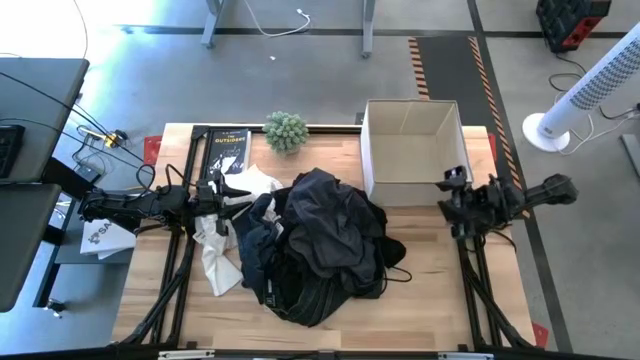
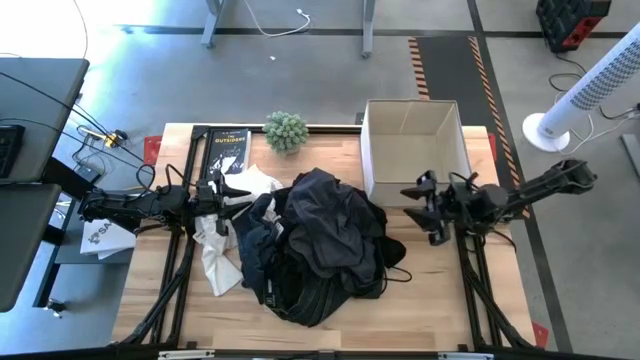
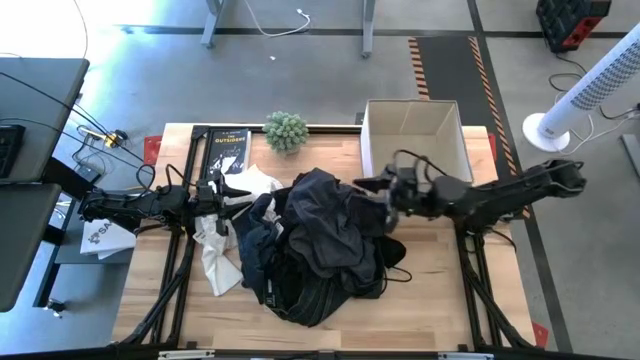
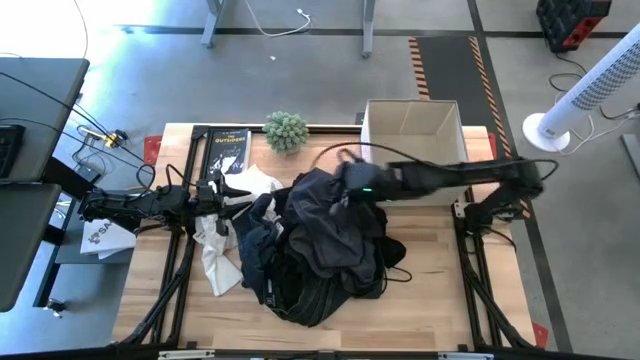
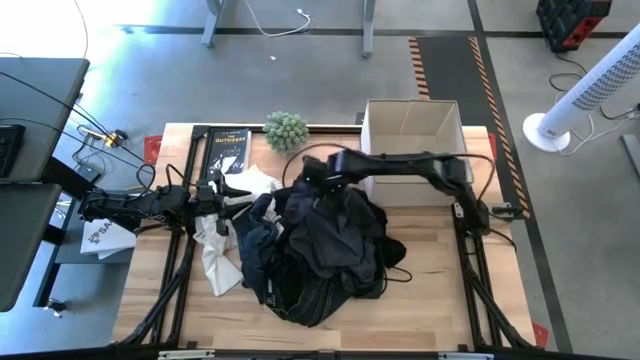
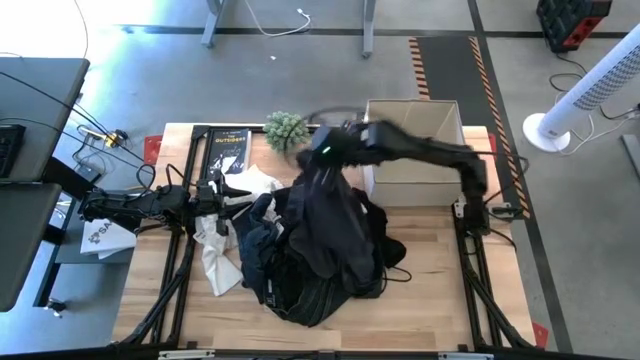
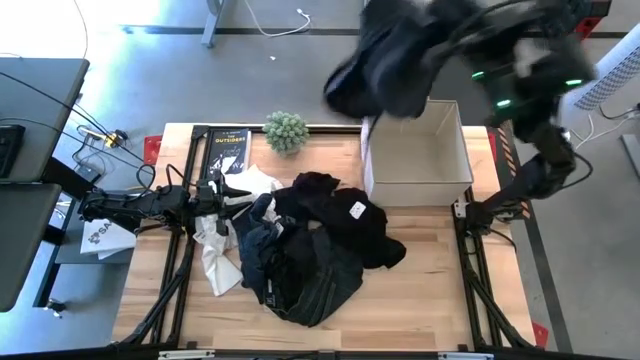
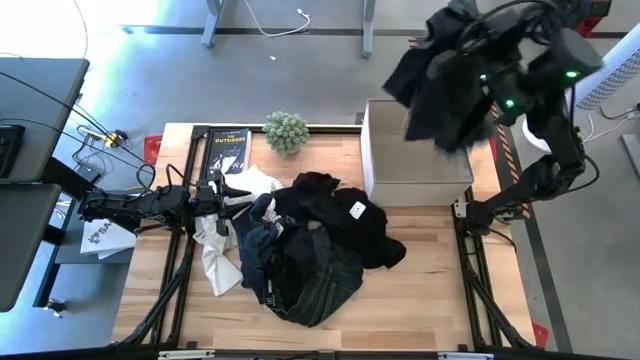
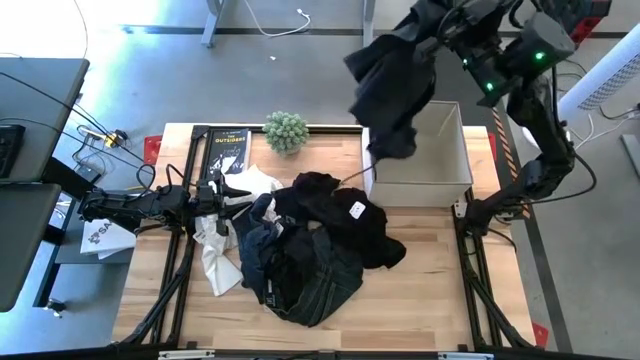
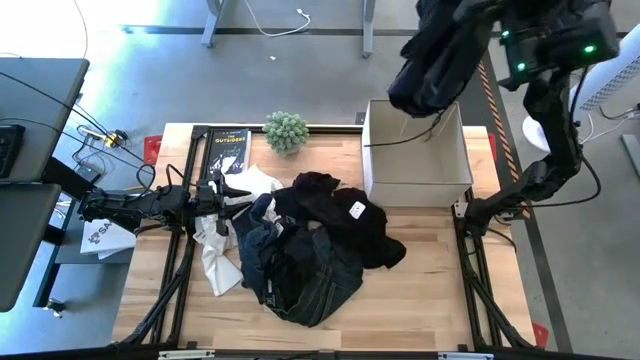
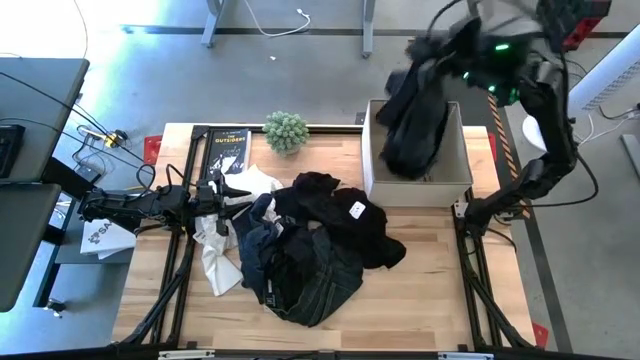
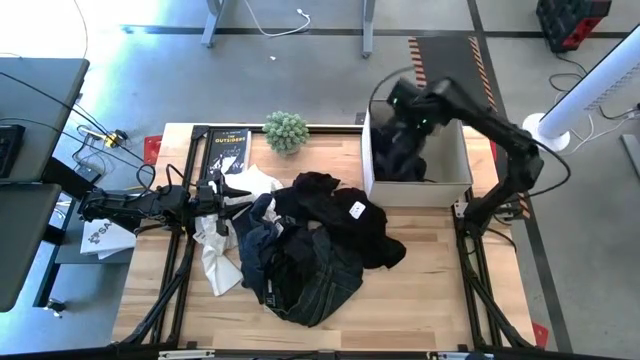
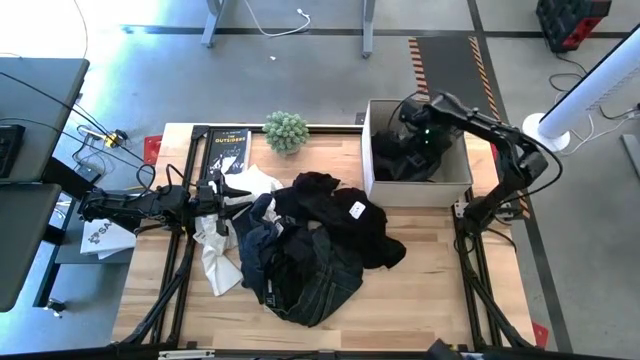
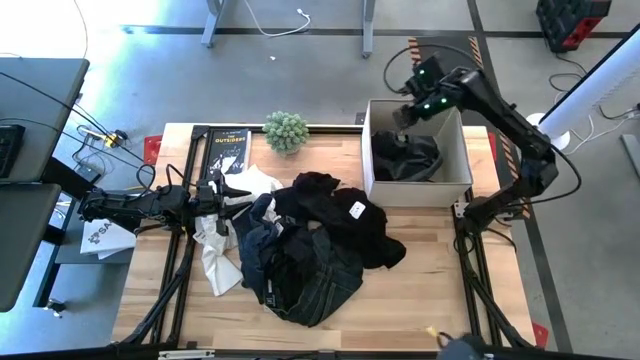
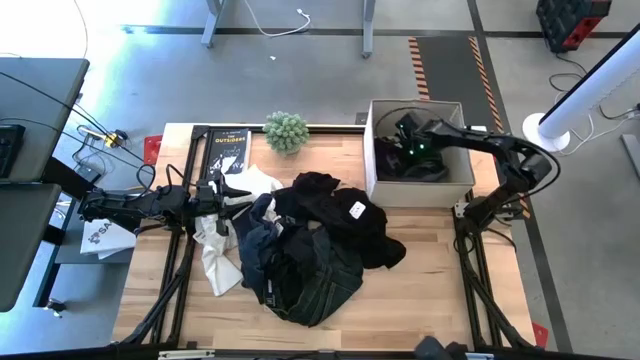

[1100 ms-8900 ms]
Task: Sort clothes
Put the dark blue shorts into the white laundry bin

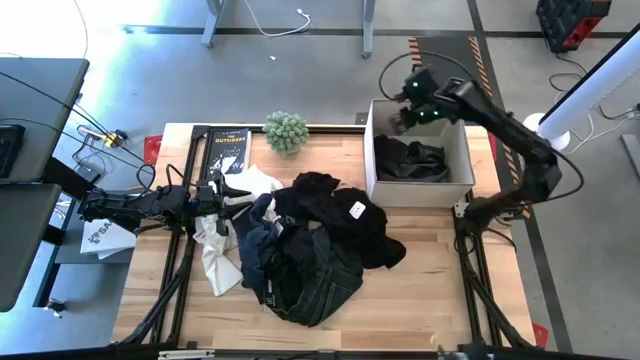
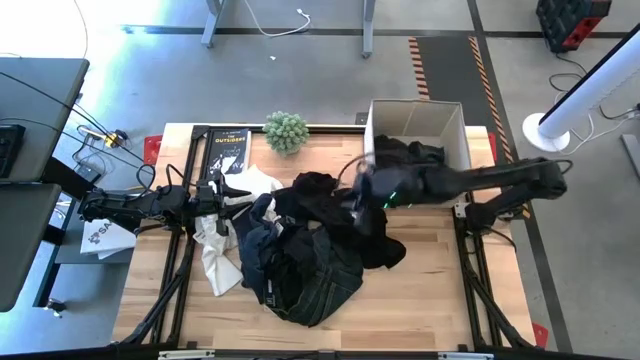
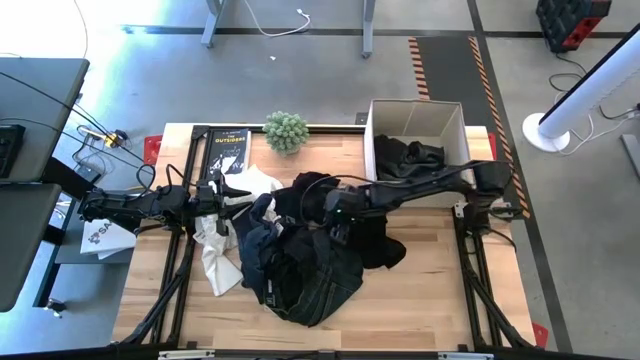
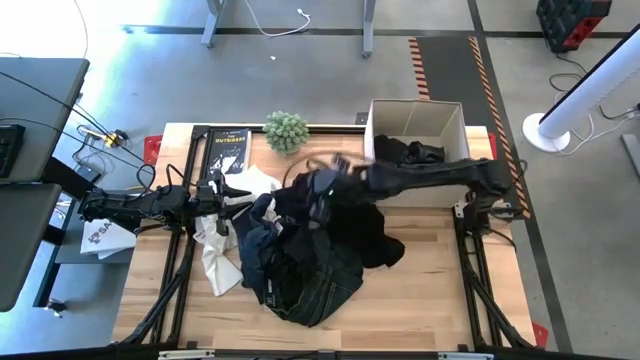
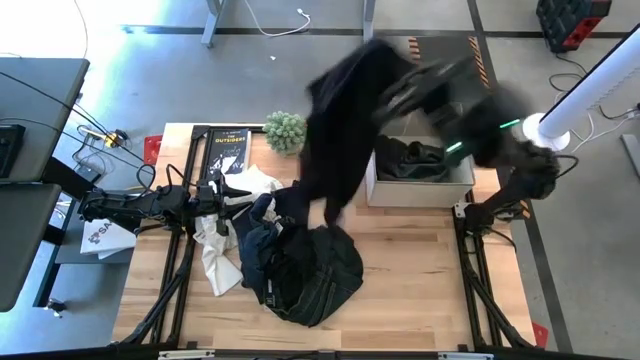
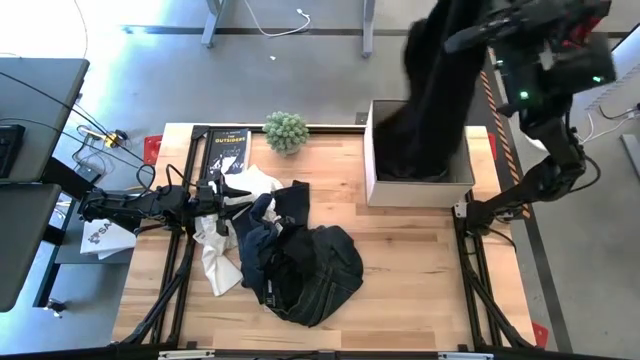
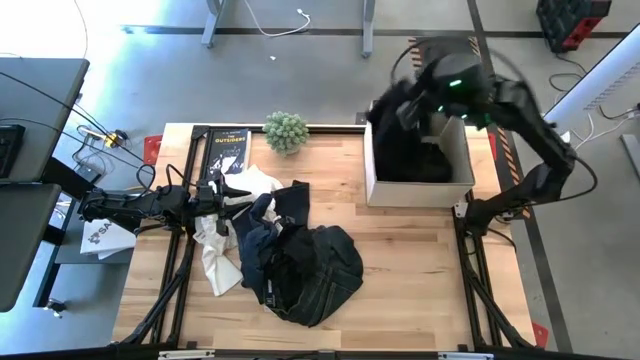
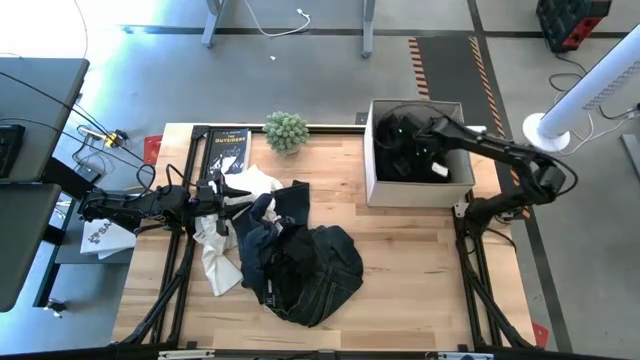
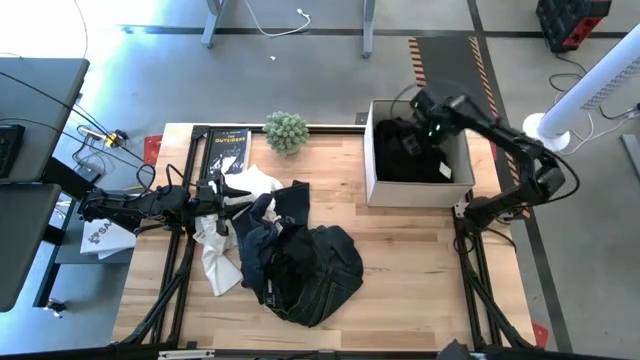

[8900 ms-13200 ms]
Put the dark blue shirt into the white laundry bin

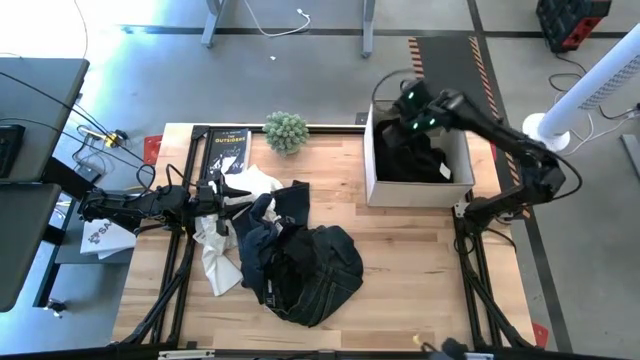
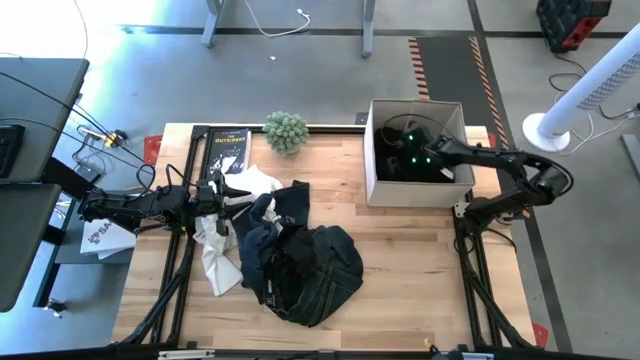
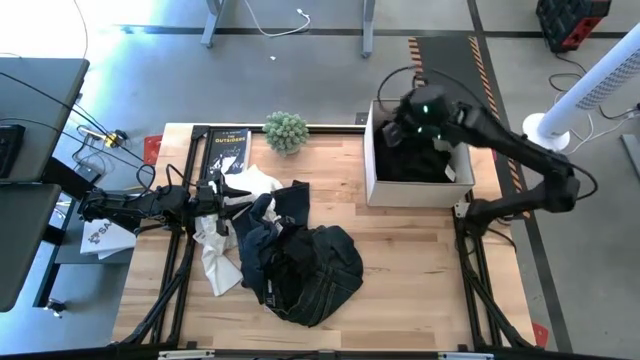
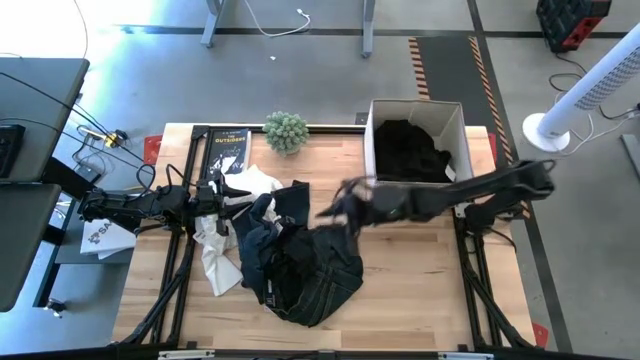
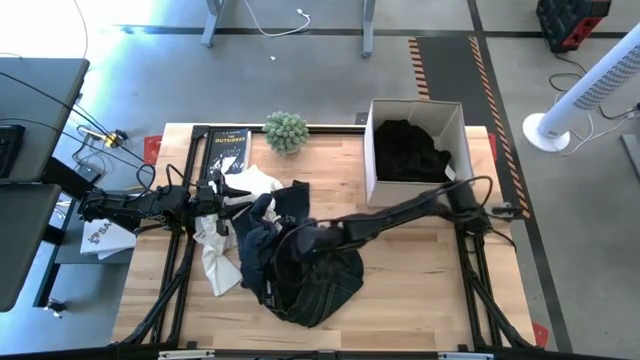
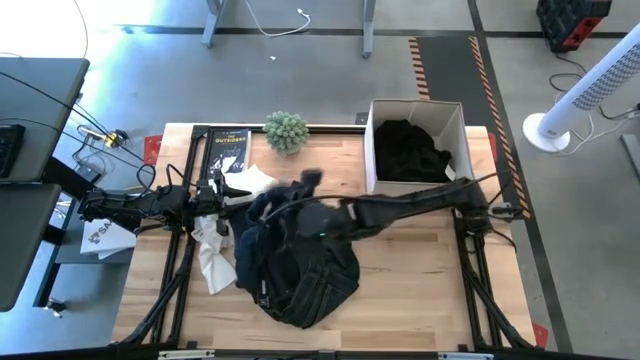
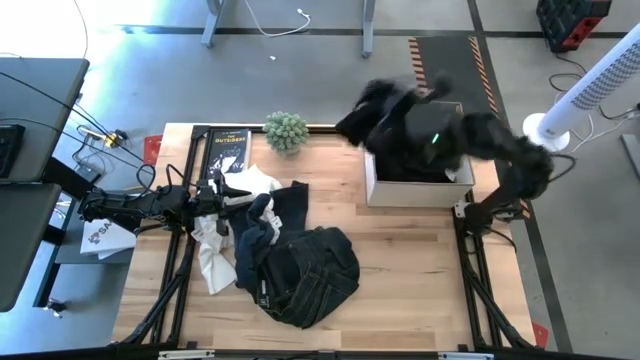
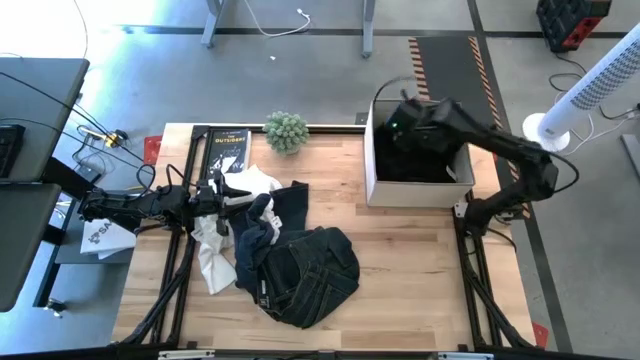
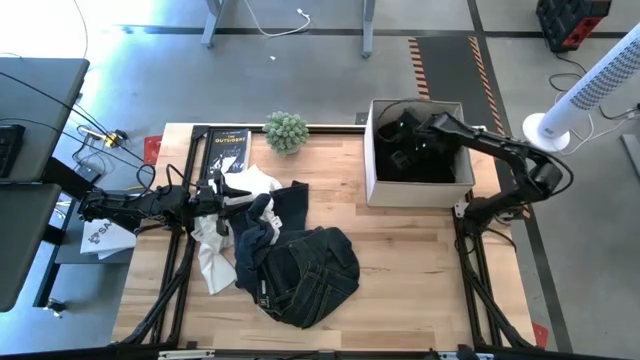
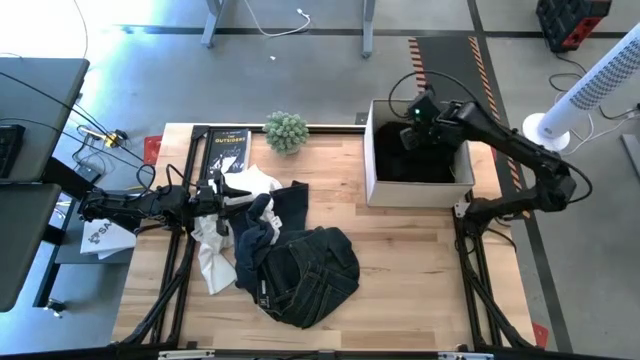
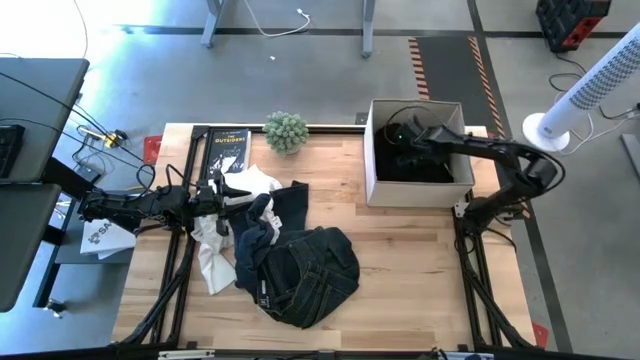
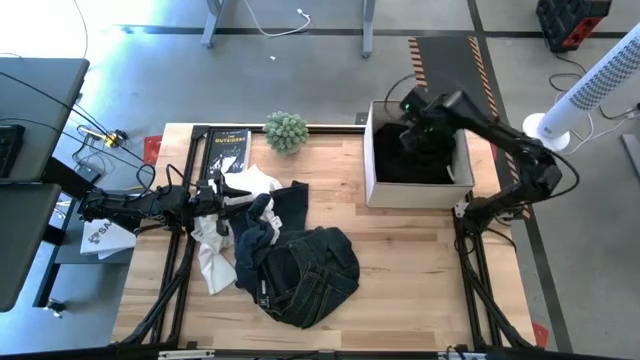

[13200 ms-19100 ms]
Put the black pants into the white laundry bin

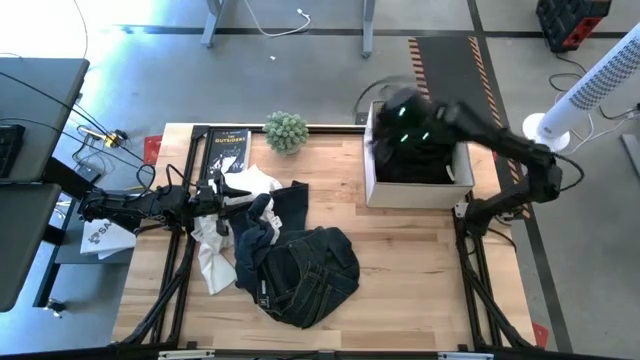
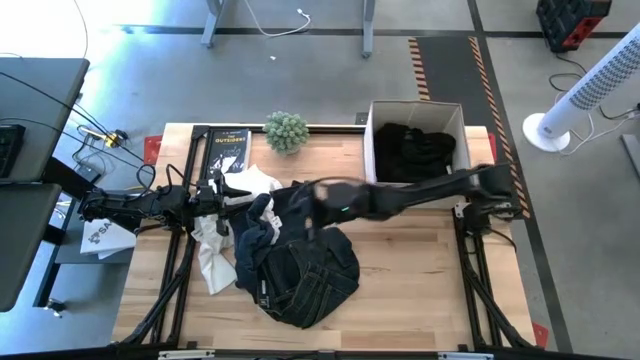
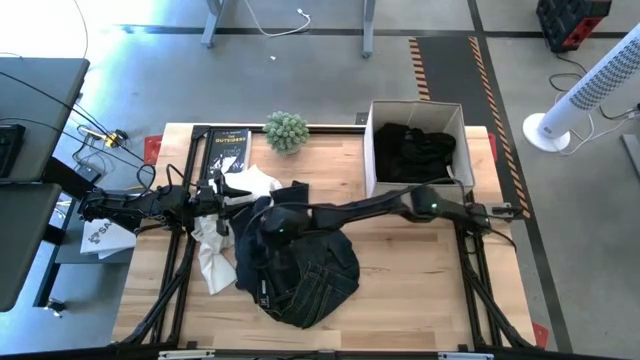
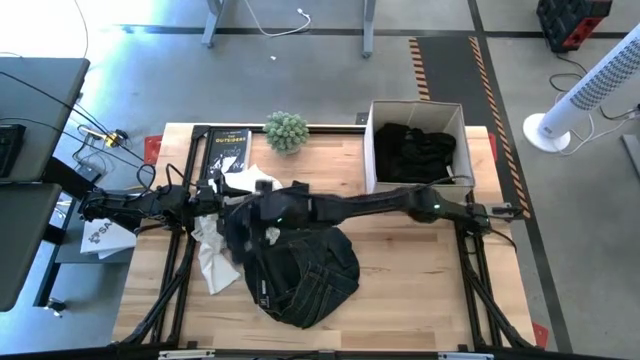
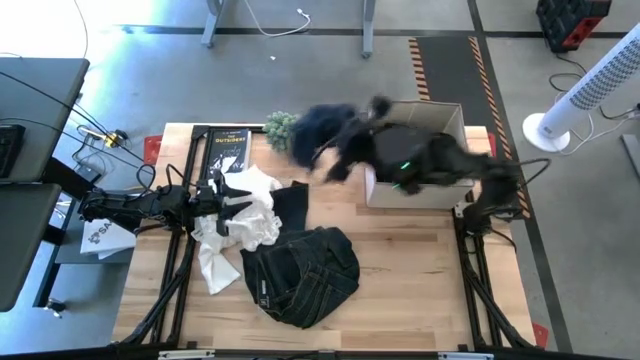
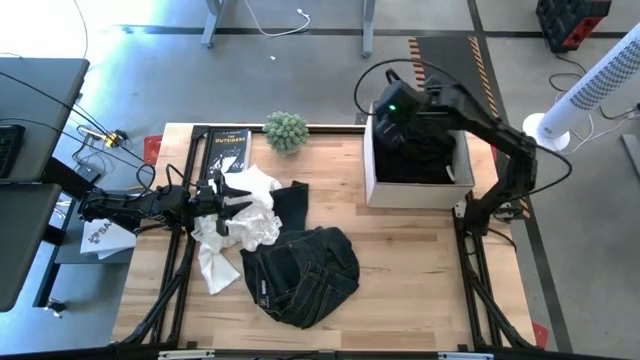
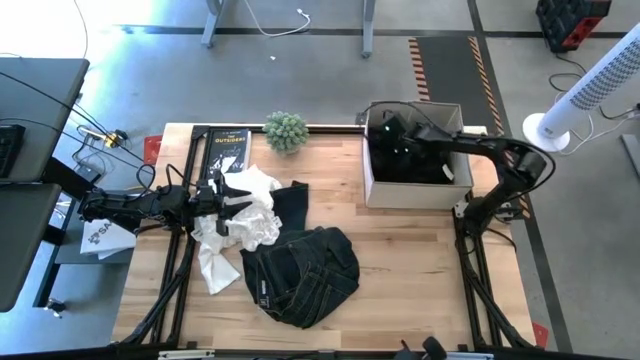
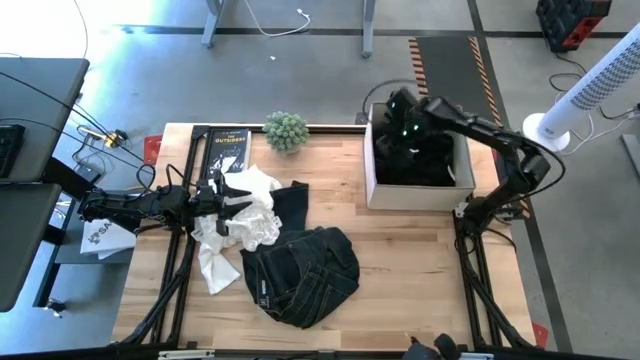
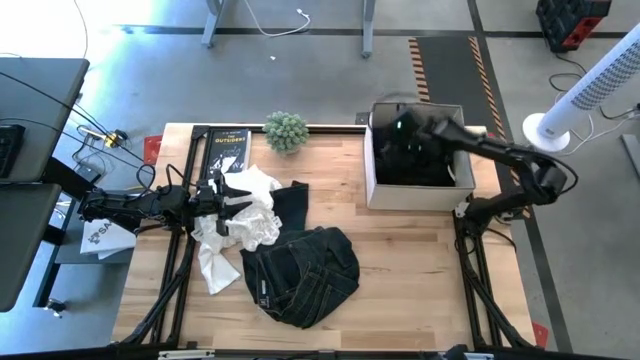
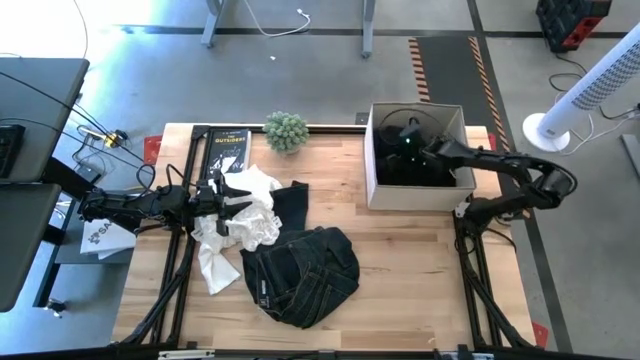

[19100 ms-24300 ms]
Put the dark blue shirt into the white laundry bin
